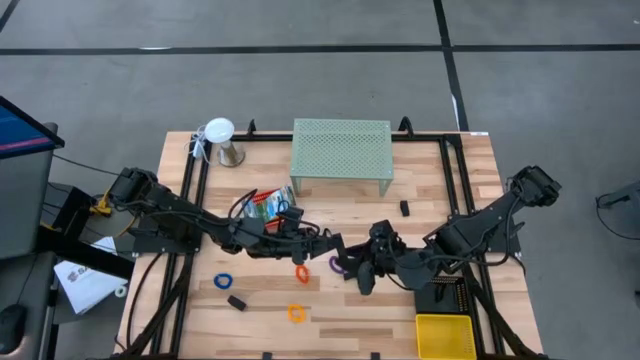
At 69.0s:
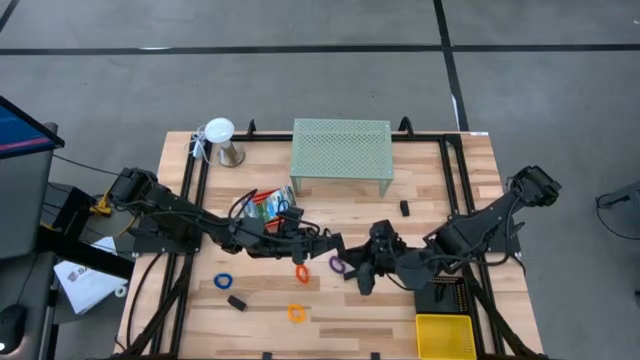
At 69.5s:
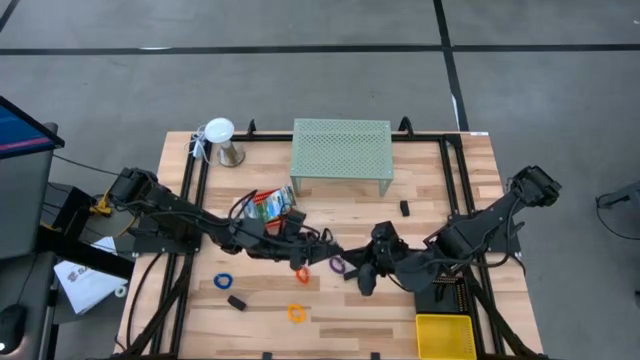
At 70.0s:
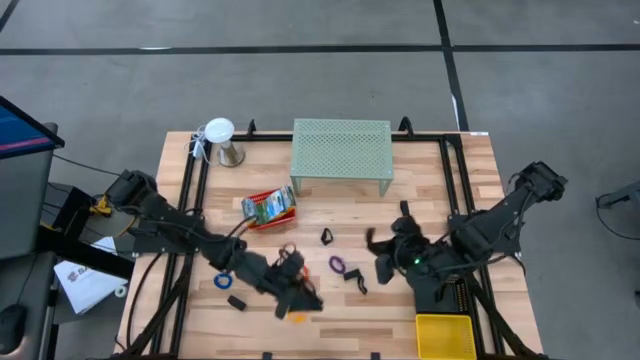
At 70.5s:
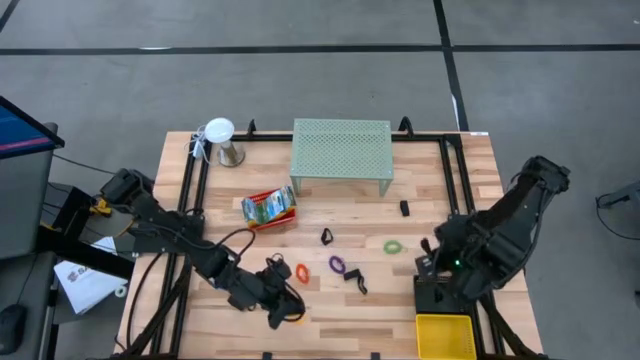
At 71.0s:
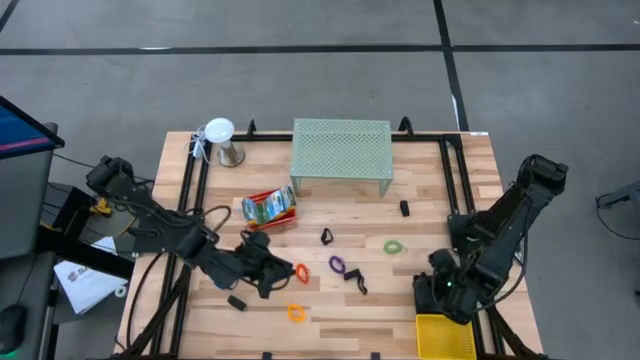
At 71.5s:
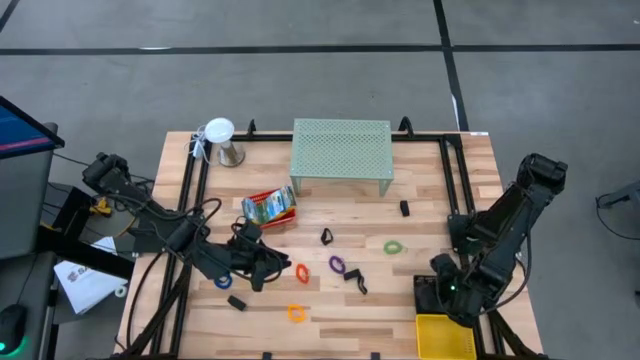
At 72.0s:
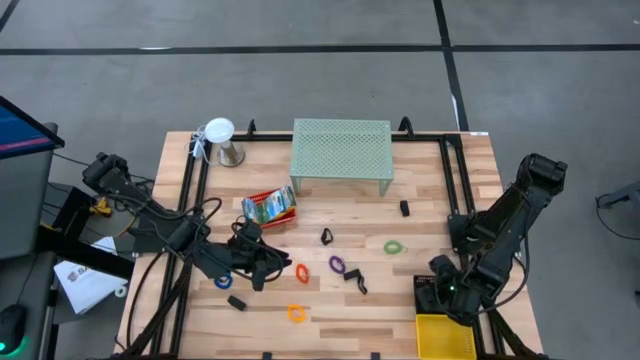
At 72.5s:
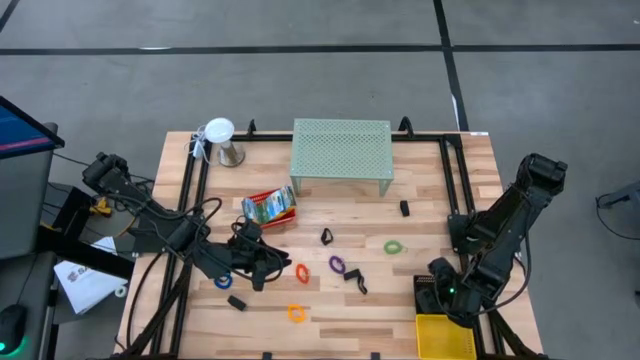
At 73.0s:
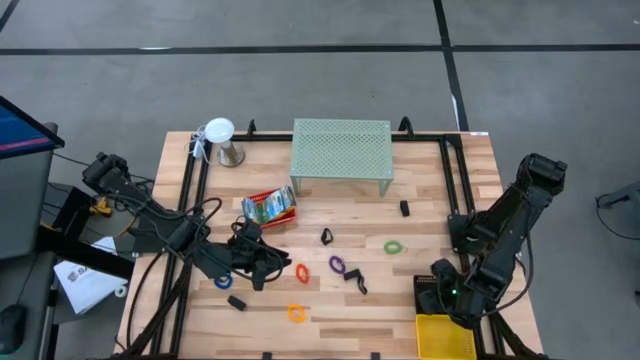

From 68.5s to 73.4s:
Task: Pick & Place Office Desk Supplies
Put the black rubber band into the black bin

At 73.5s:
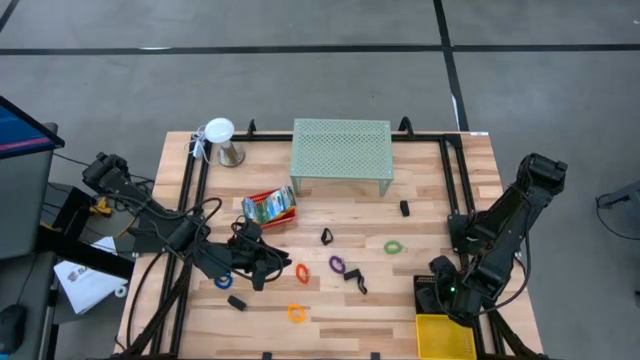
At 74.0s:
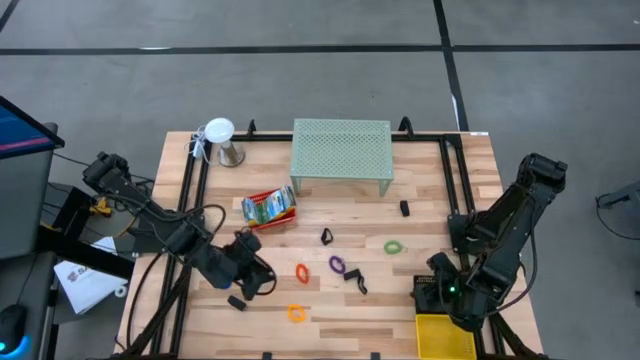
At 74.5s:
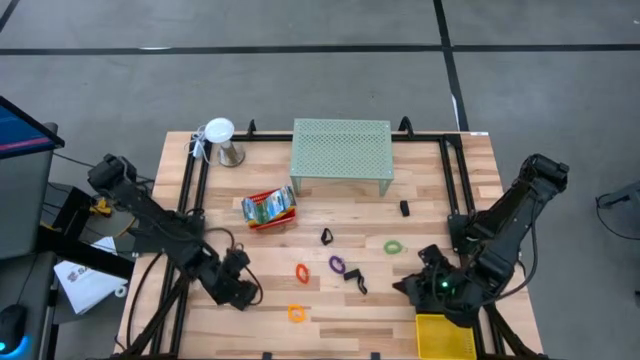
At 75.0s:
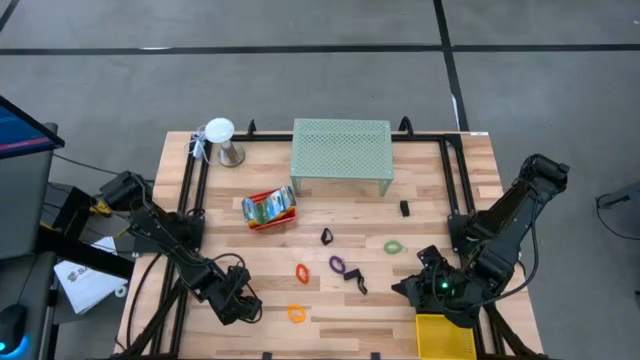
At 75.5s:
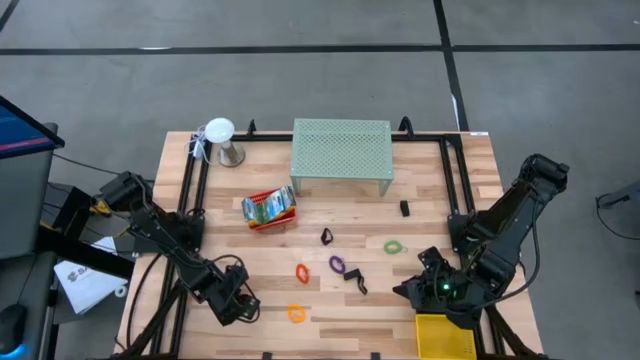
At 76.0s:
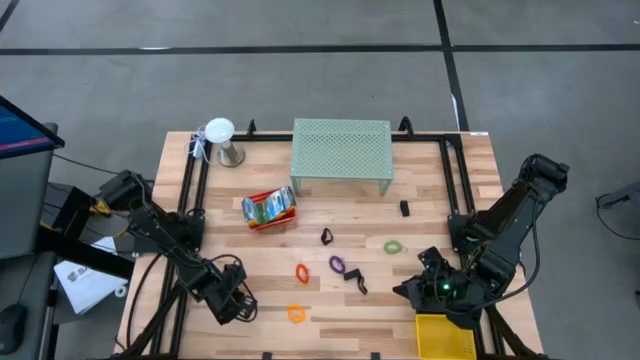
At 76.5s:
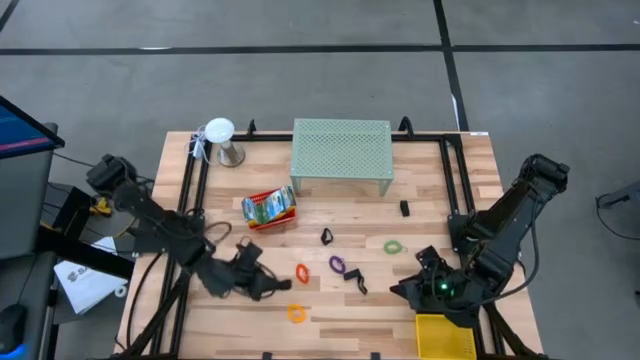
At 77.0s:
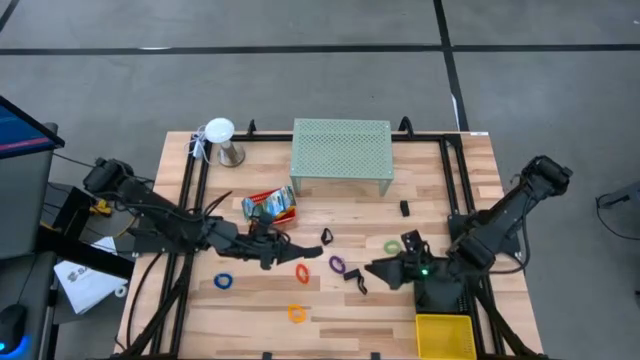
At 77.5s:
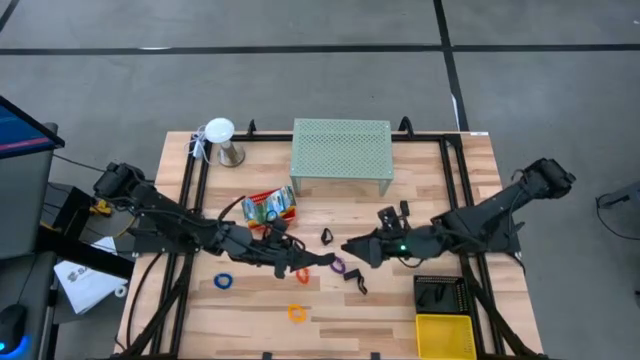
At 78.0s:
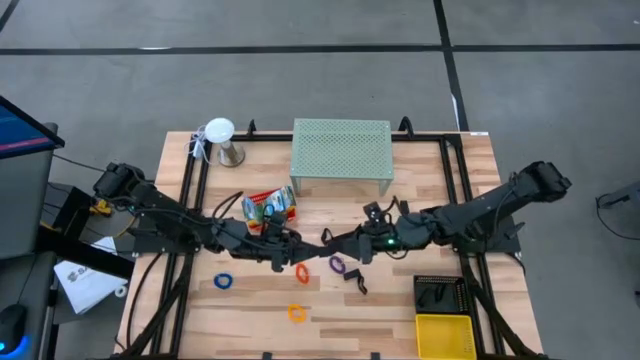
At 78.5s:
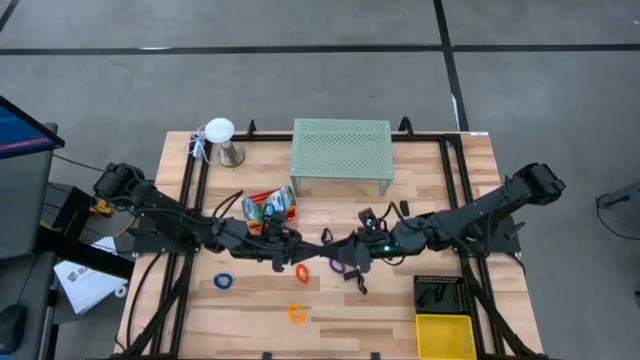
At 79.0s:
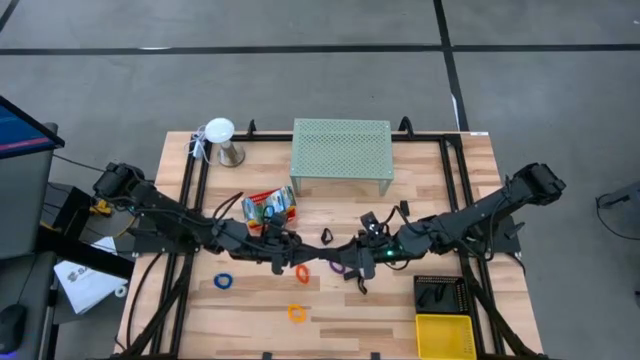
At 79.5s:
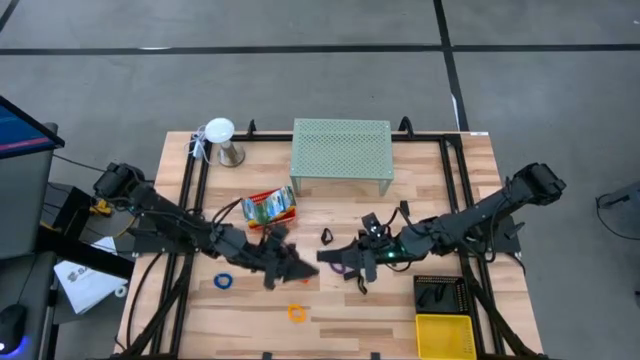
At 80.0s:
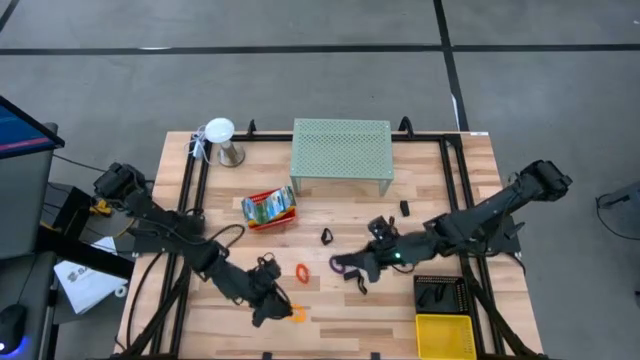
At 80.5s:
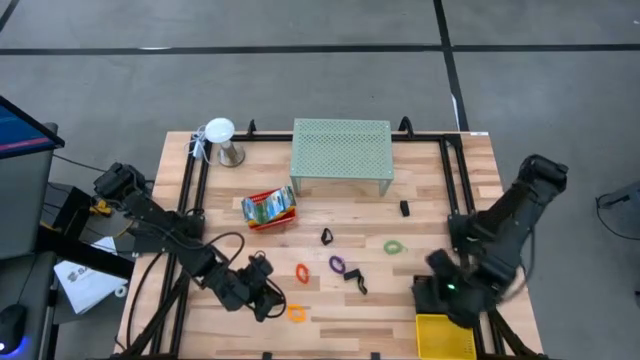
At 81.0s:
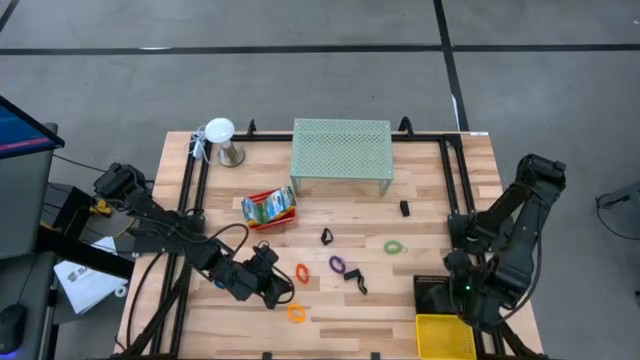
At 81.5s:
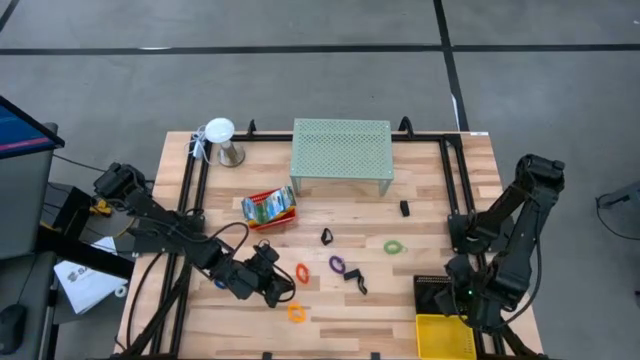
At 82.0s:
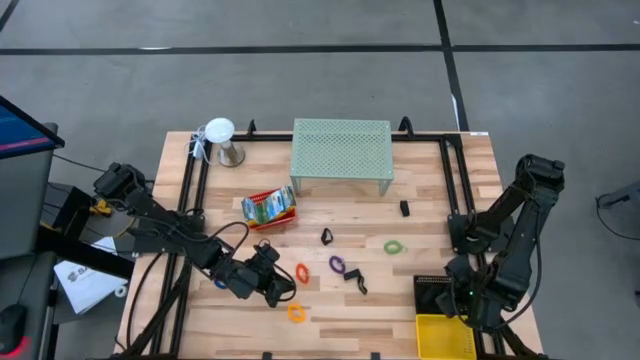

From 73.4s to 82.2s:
Put the black rubber band into the black bin

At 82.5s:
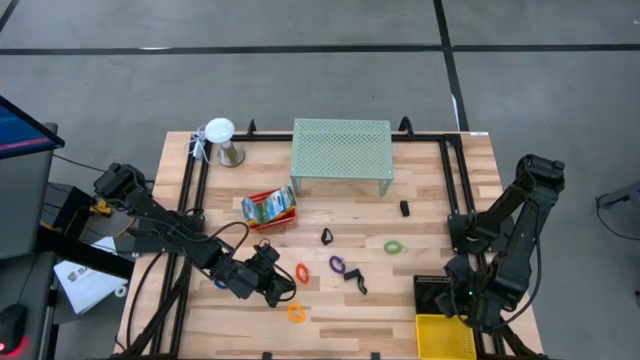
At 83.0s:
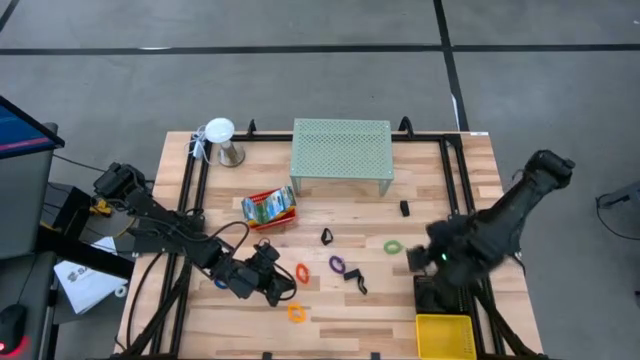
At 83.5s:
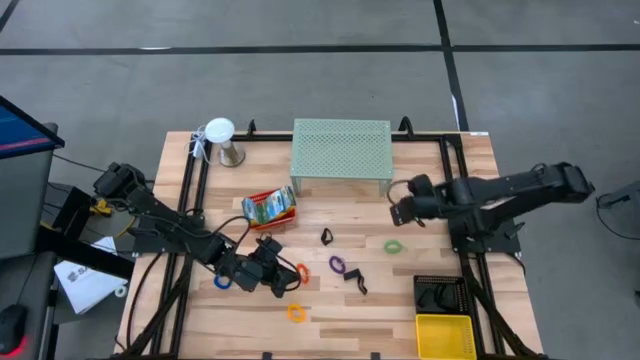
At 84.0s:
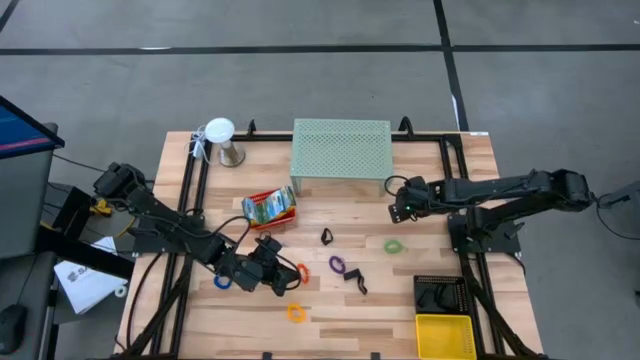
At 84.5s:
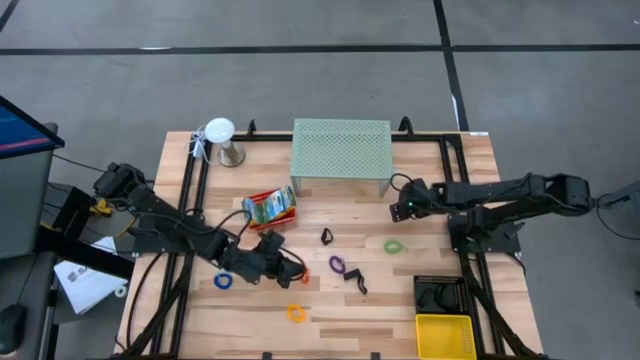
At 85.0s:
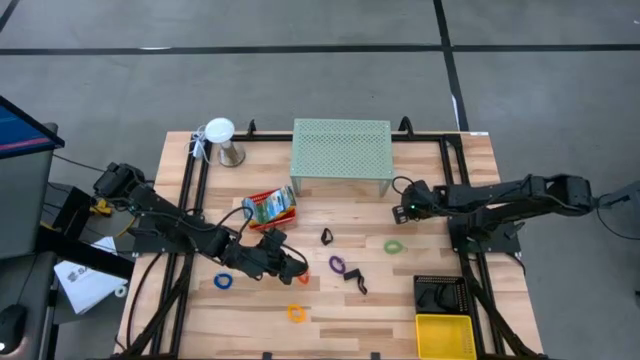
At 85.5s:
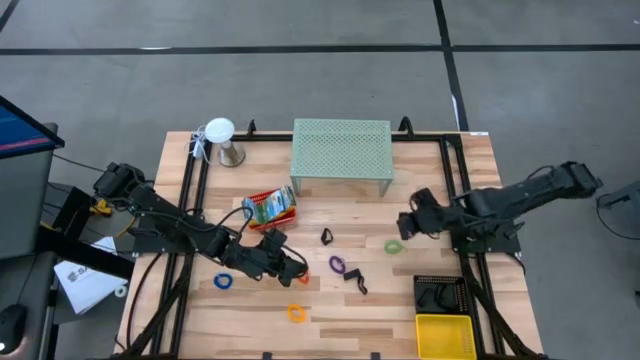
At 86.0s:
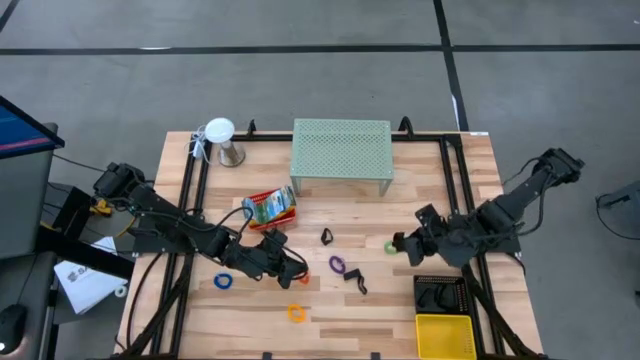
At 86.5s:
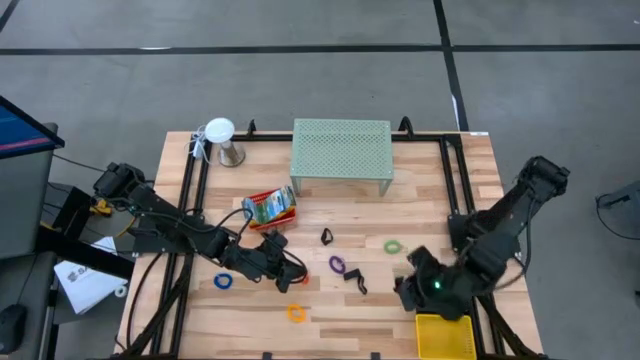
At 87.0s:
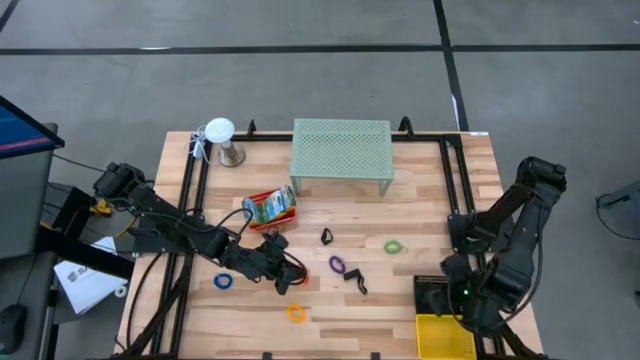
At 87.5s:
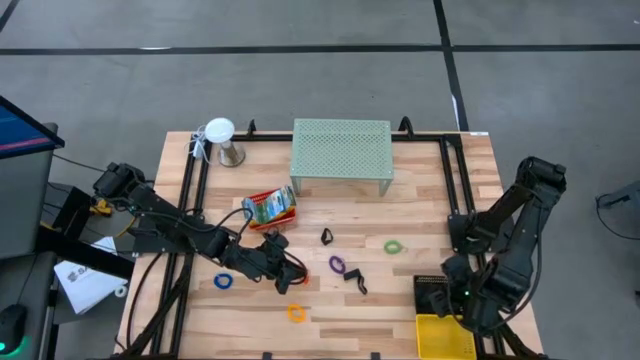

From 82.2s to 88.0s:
Put the black rubber band into the black bin

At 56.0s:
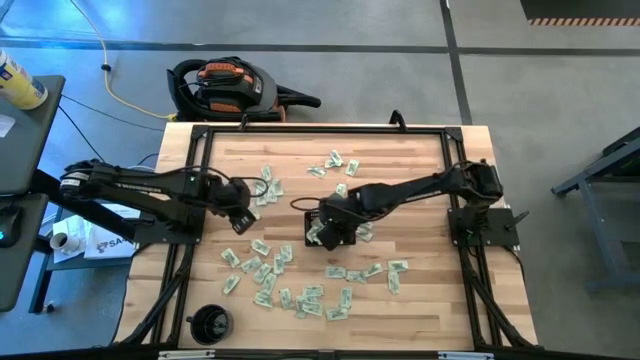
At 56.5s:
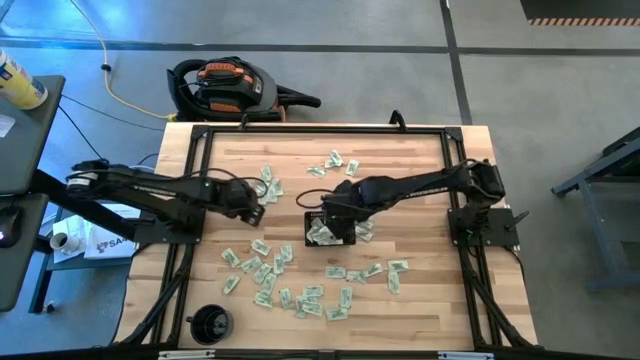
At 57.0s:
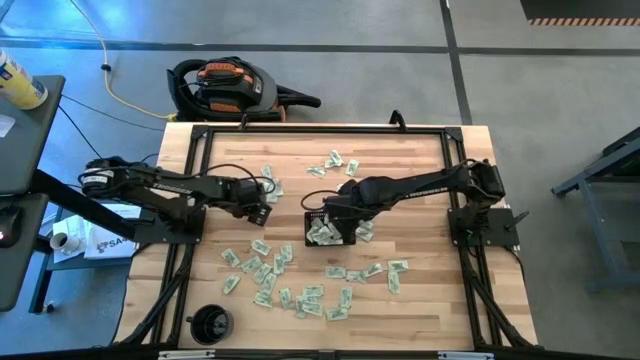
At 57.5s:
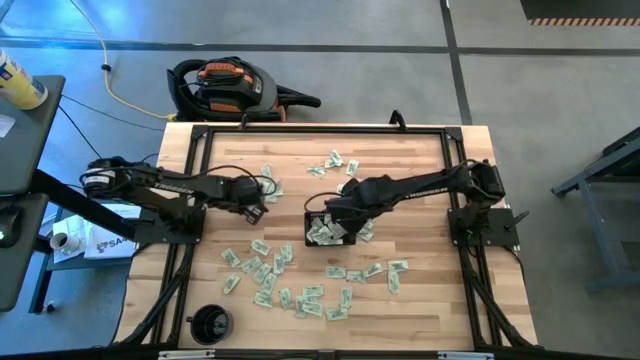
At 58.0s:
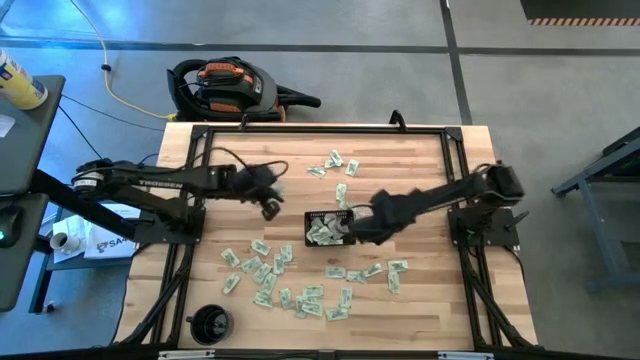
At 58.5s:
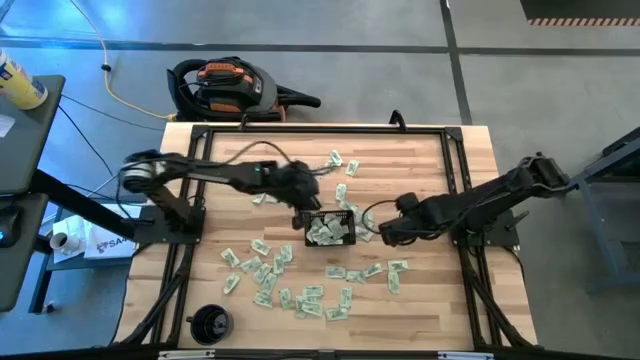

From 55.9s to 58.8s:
Task: Pick and place Stevia / Truvia into bins
Put the green stevia packet into the black basket
